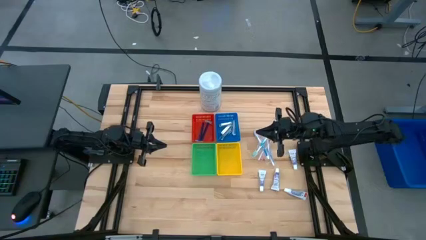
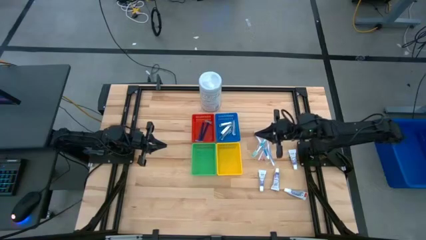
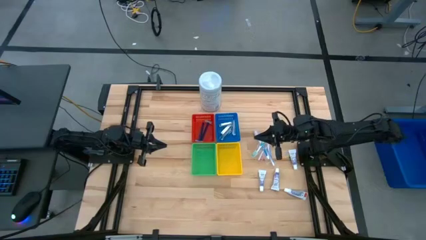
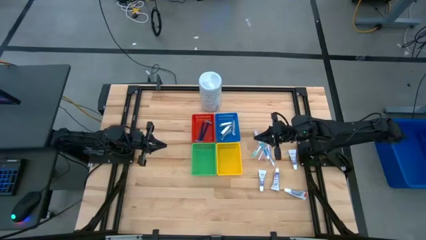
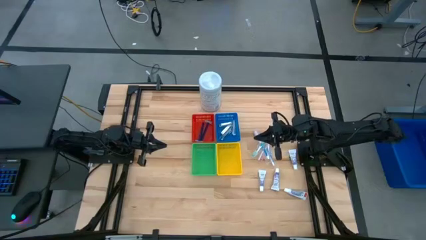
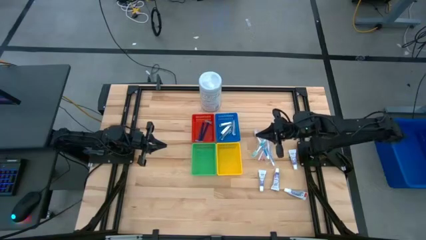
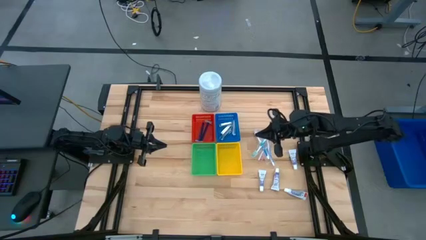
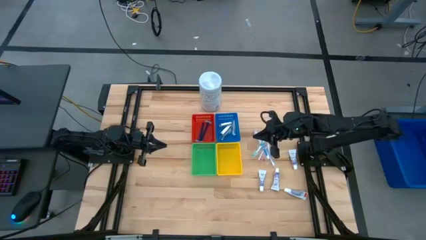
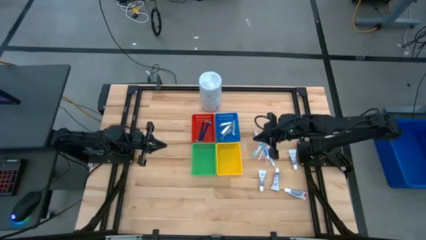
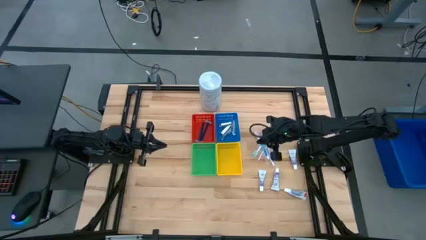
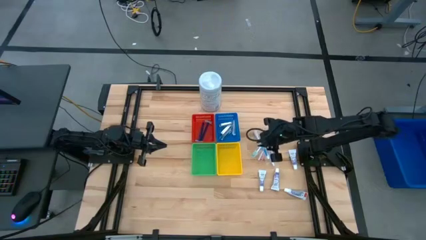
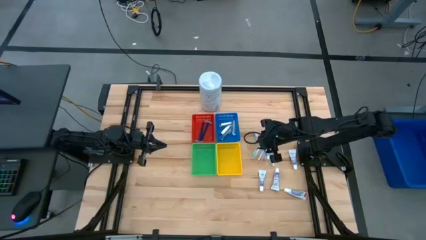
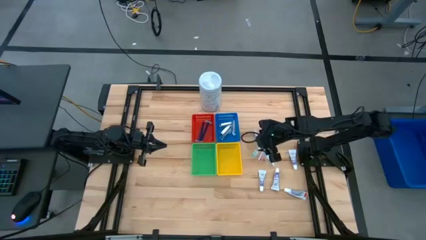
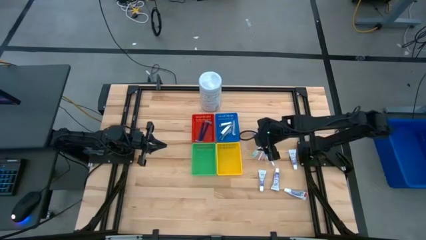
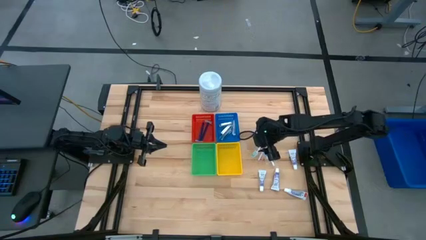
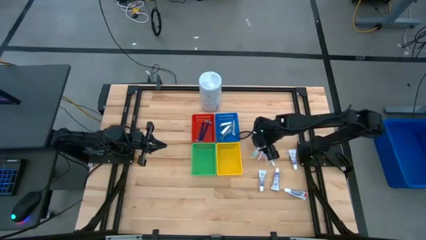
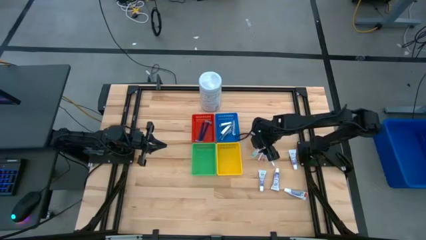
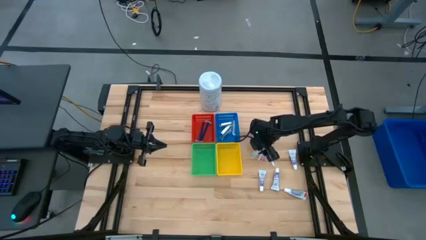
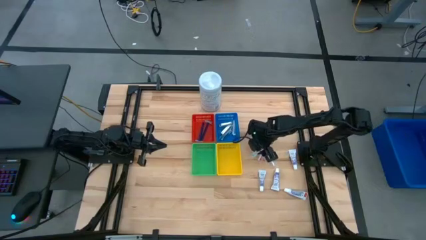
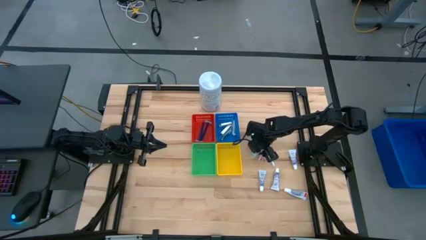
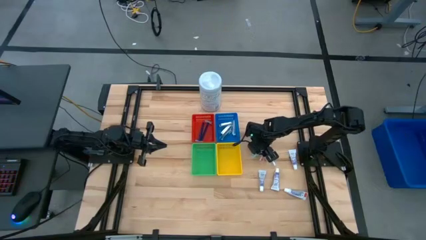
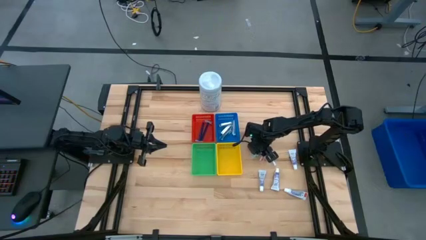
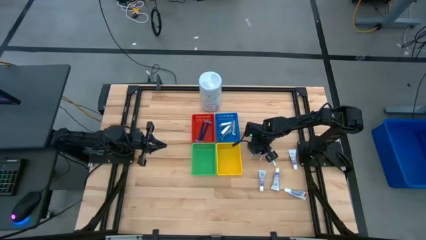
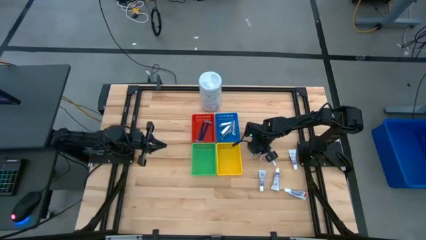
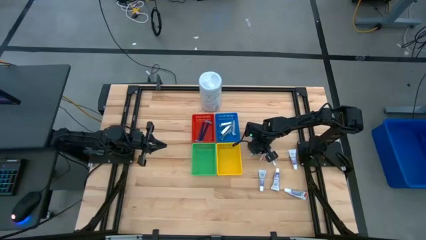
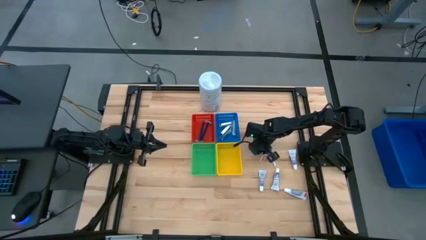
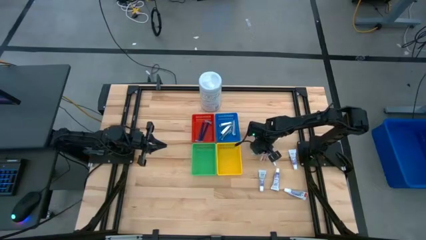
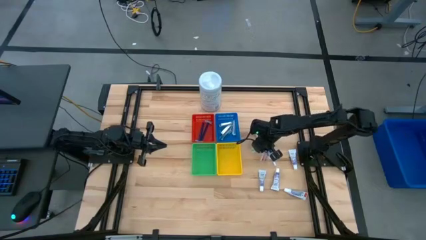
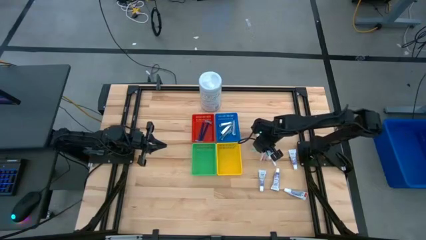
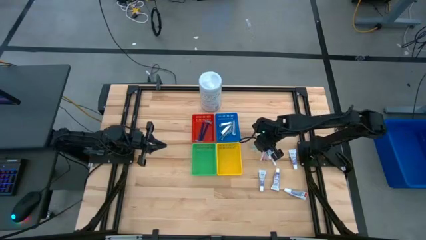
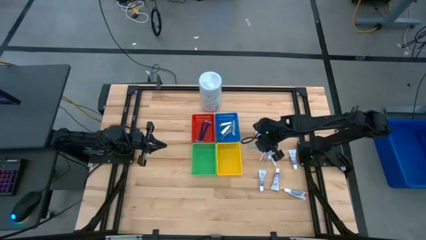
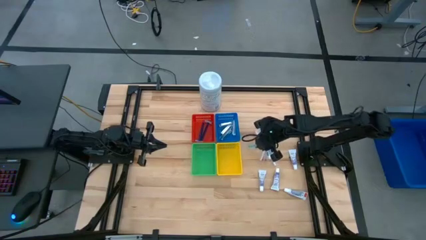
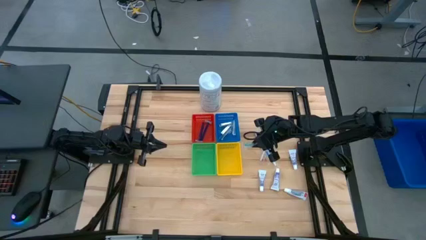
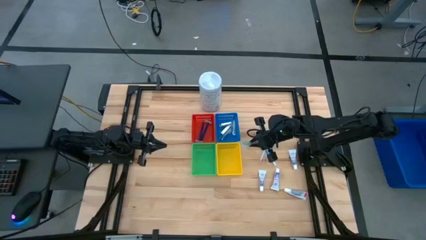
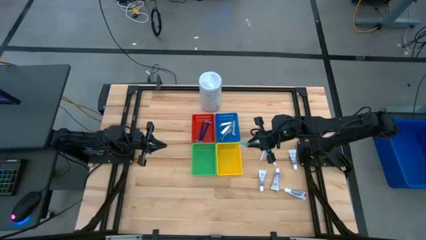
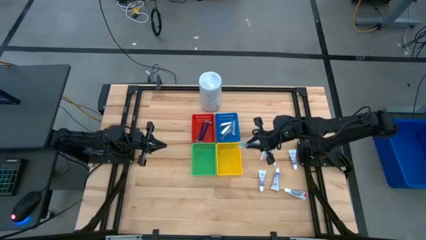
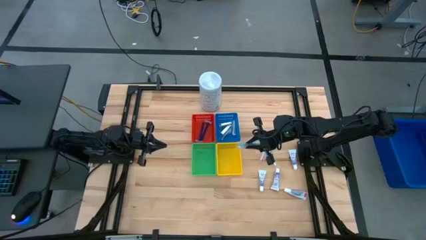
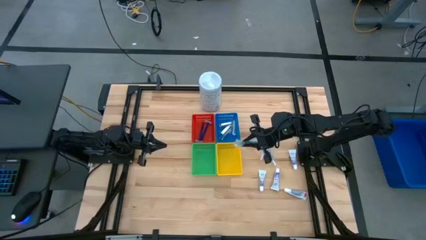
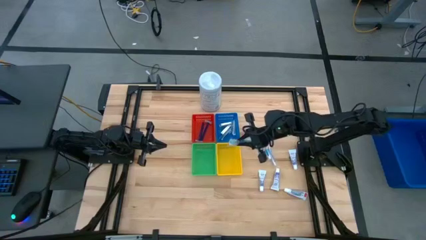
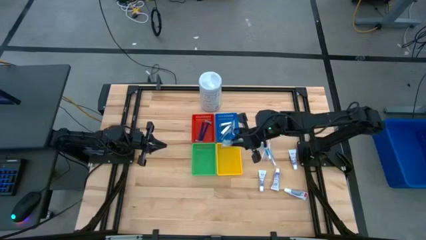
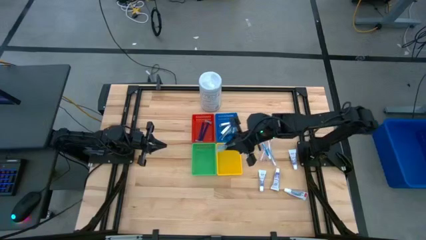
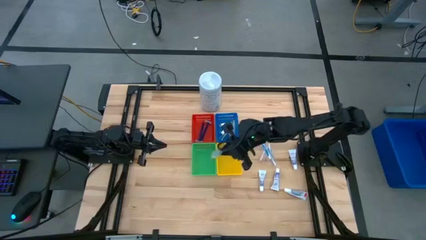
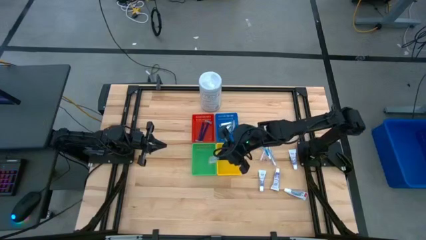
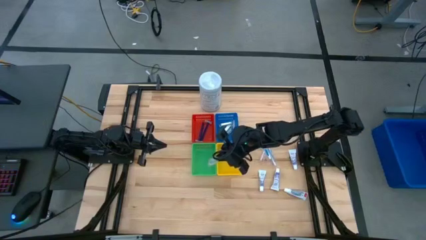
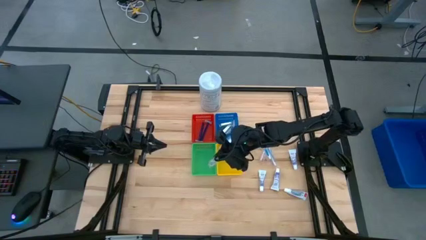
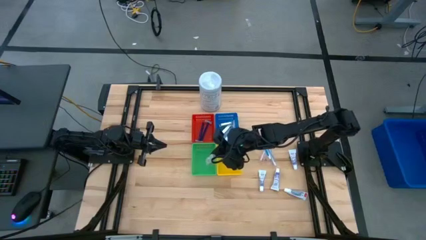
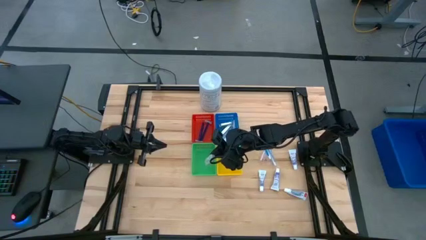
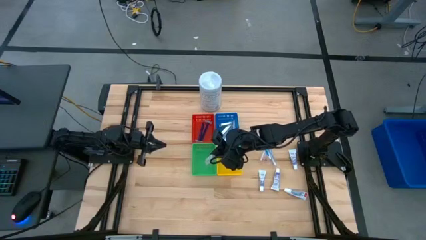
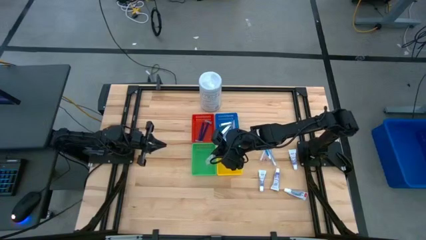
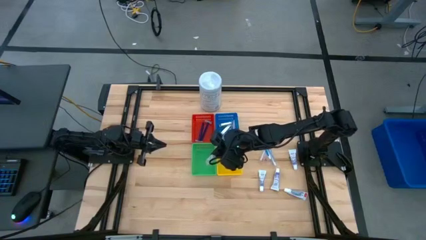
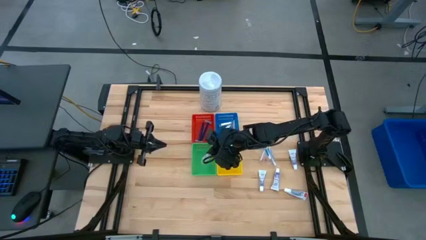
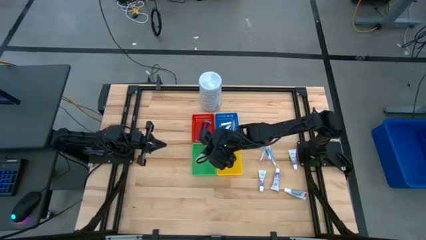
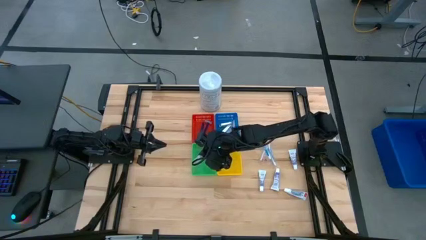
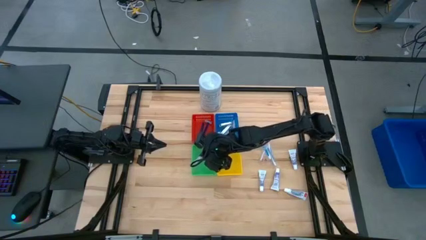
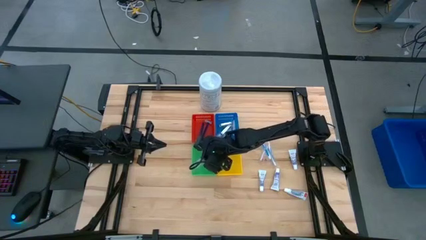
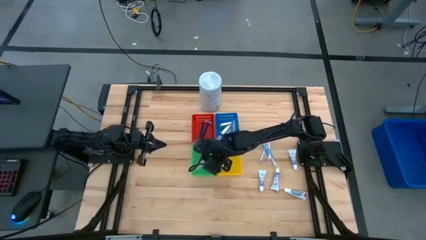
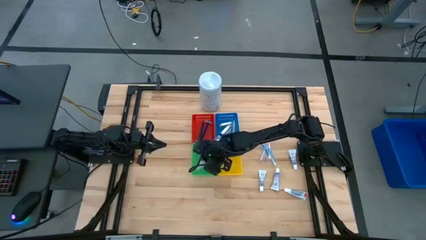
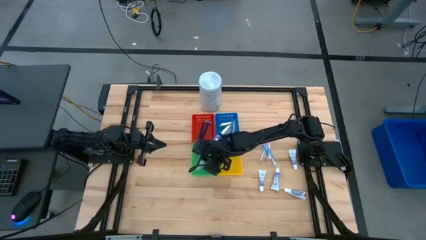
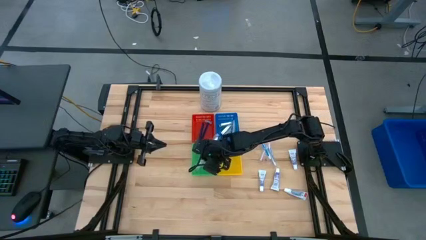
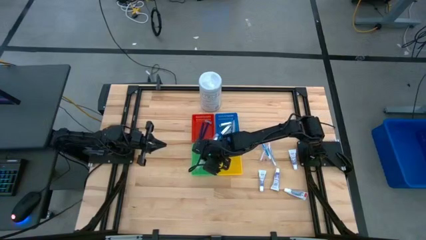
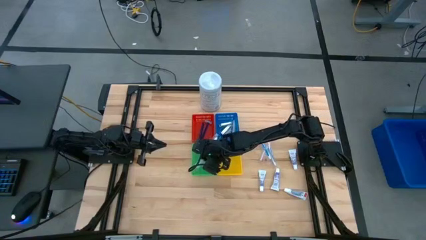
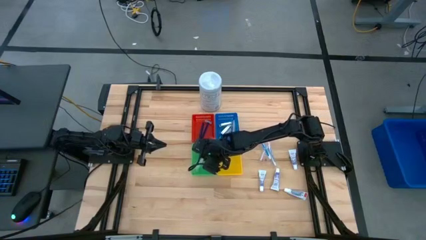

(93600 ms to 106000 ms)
Task: Pick & Place Travel size toiletries
Put the green toothbrush into the green bin

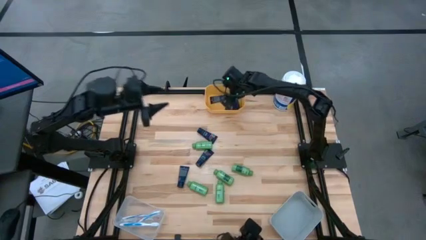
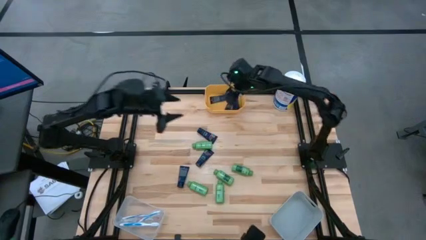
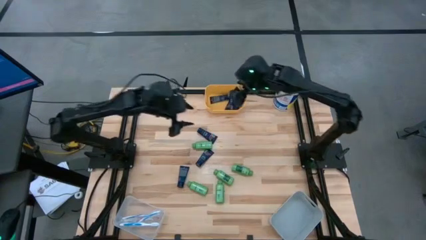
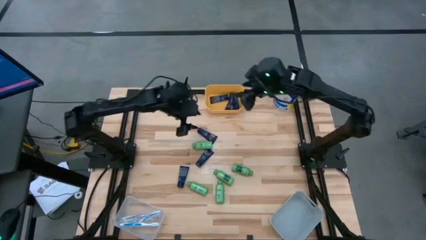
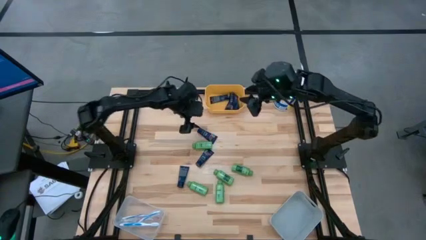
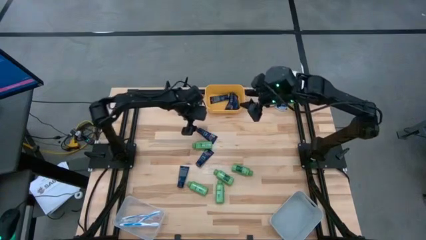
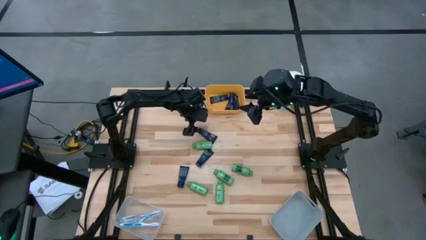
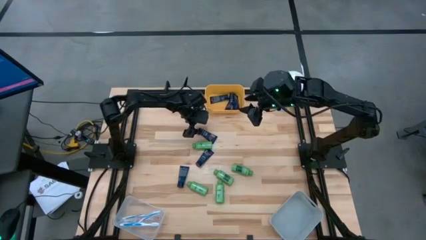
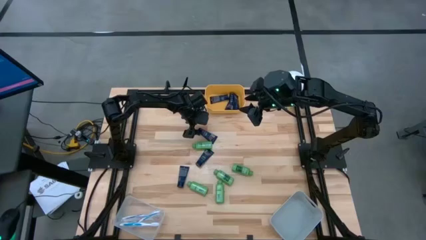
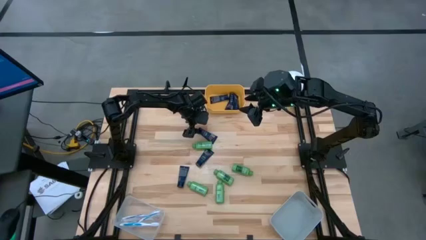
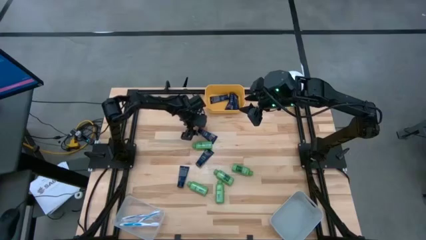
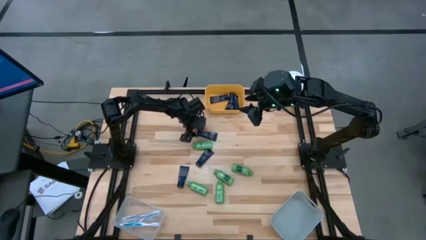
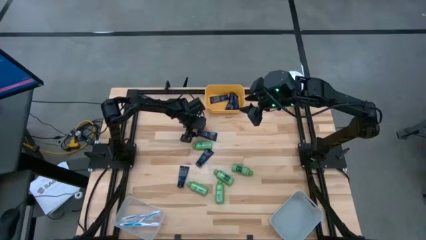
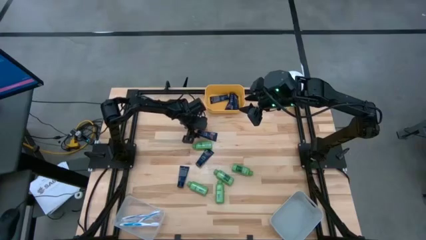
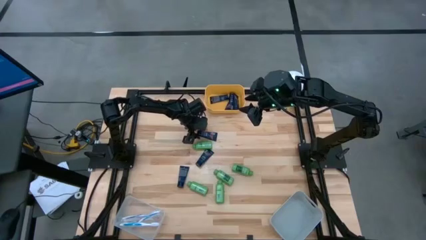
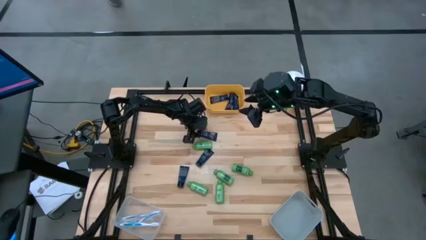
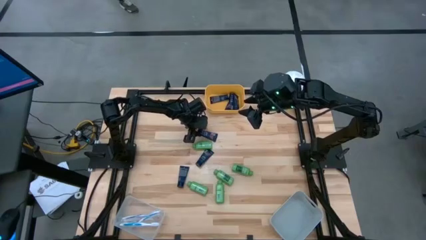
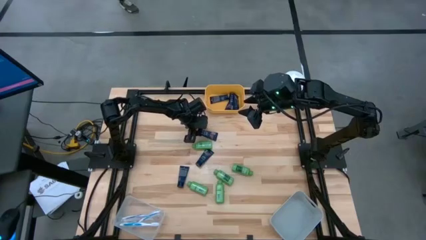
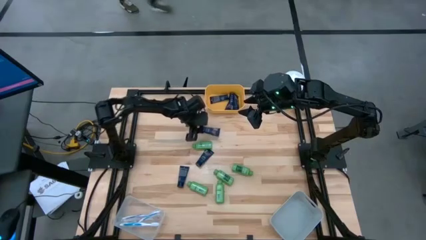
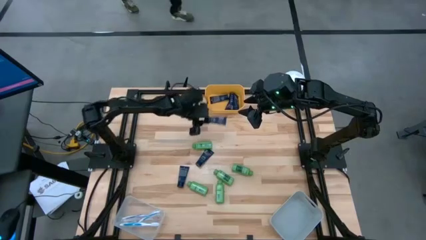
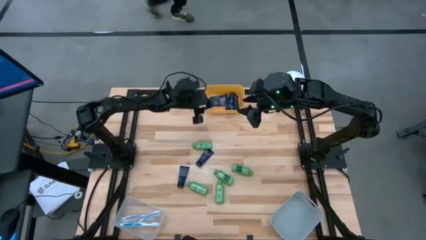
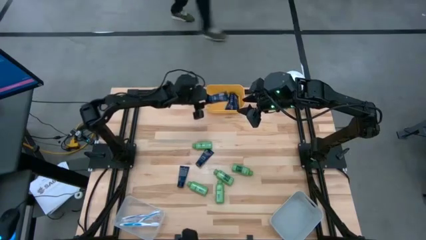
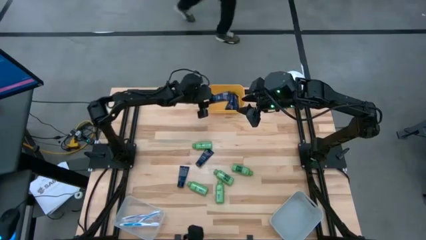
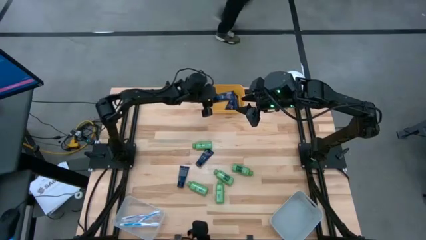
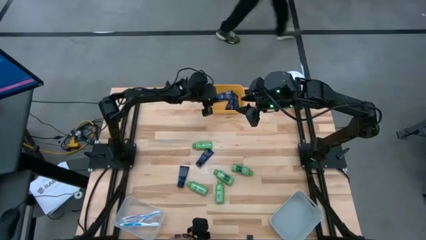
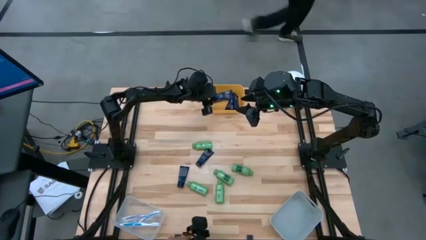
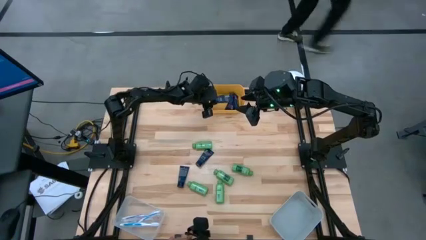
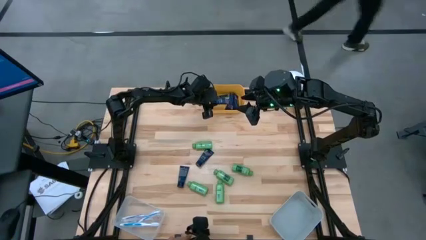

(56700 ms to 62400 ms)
Task: Pick & Place Travel size toiletries
Put the shave cream into the yellow bin
